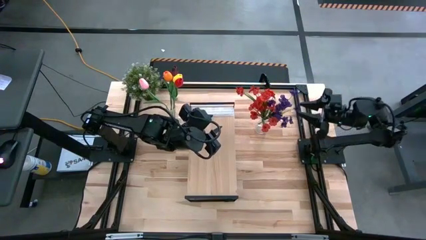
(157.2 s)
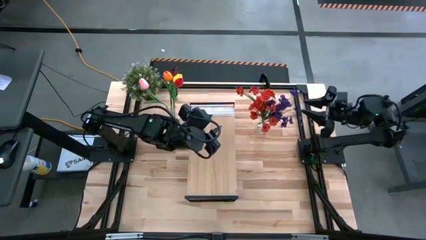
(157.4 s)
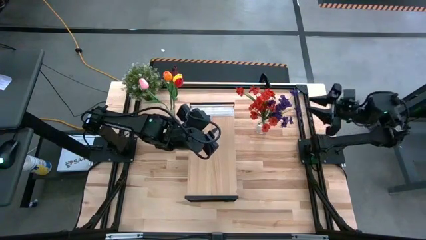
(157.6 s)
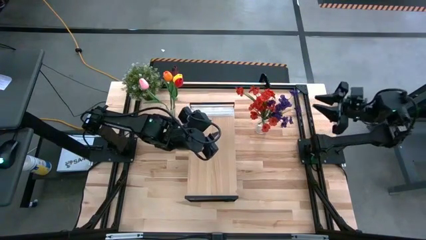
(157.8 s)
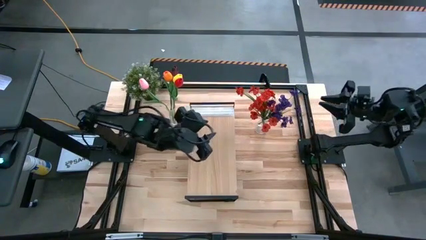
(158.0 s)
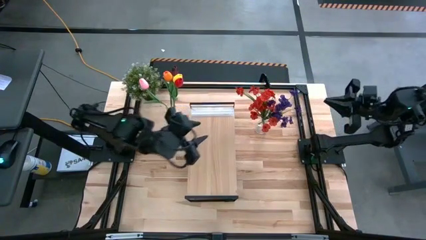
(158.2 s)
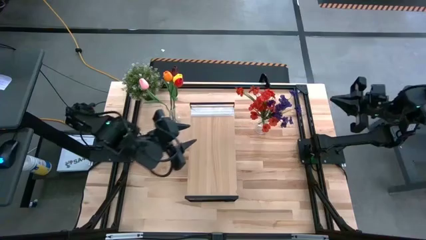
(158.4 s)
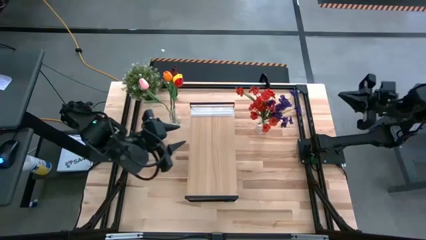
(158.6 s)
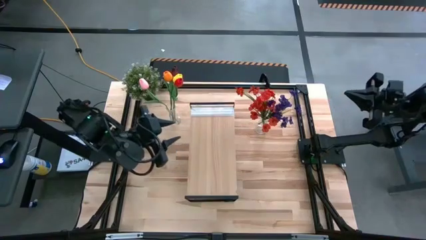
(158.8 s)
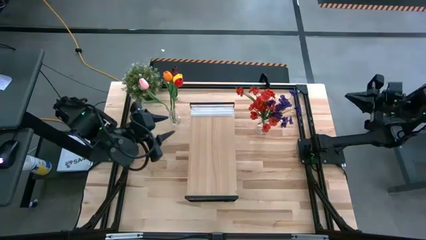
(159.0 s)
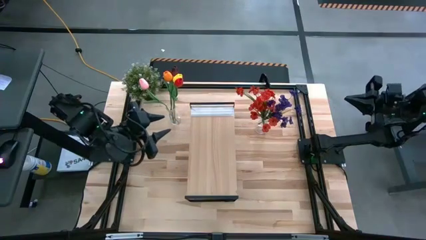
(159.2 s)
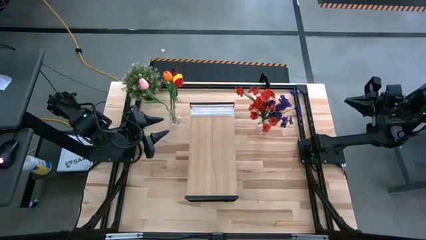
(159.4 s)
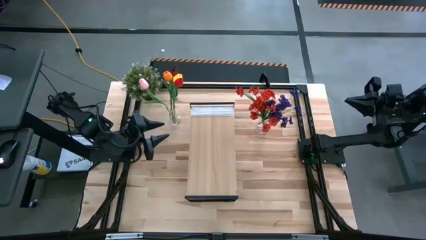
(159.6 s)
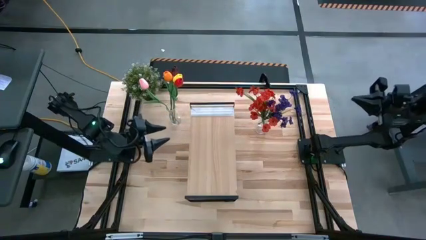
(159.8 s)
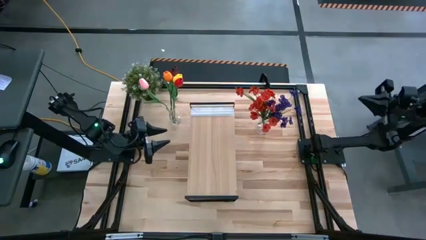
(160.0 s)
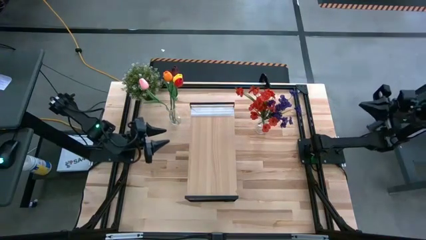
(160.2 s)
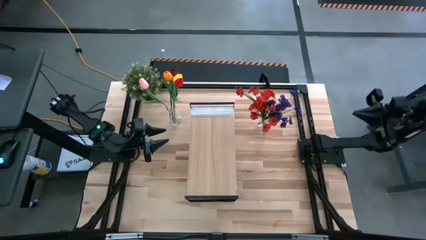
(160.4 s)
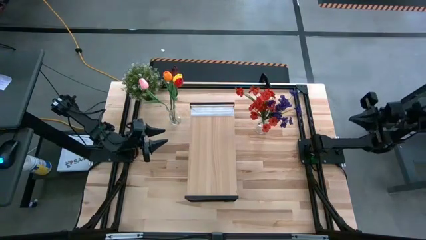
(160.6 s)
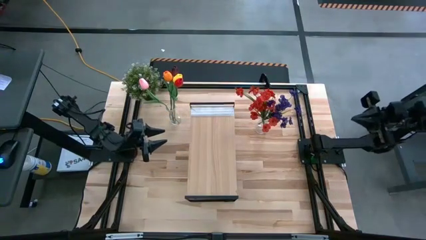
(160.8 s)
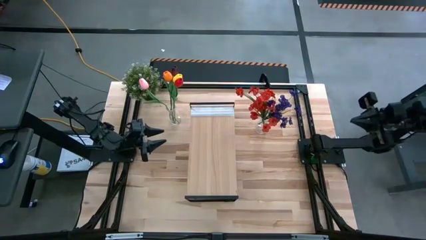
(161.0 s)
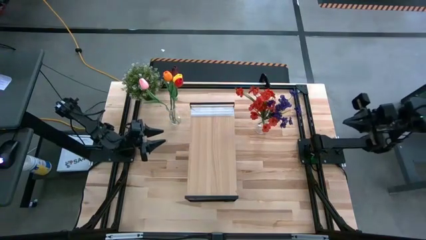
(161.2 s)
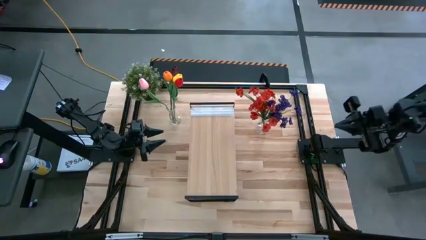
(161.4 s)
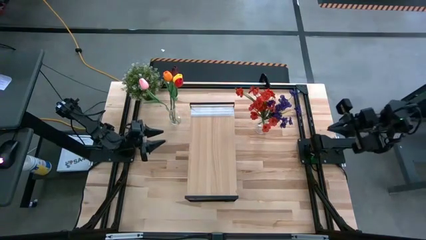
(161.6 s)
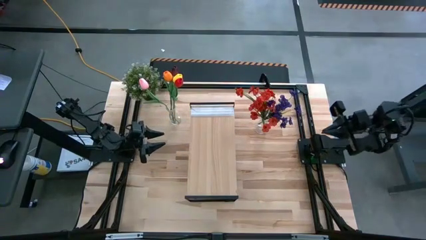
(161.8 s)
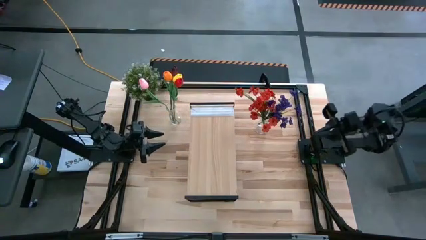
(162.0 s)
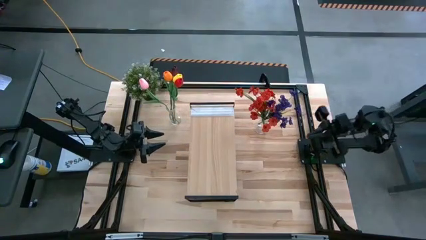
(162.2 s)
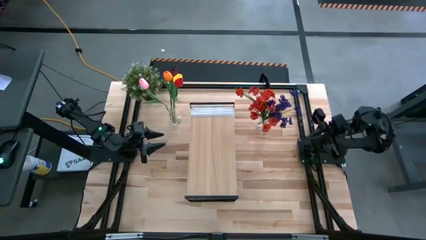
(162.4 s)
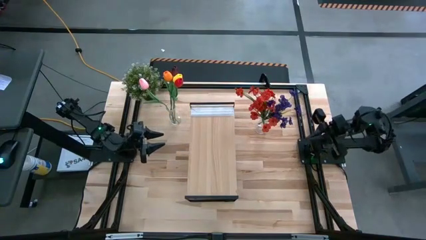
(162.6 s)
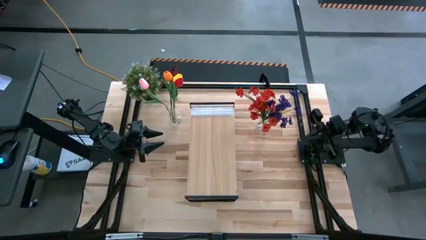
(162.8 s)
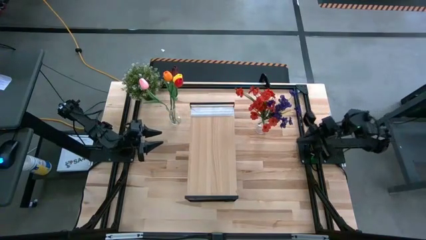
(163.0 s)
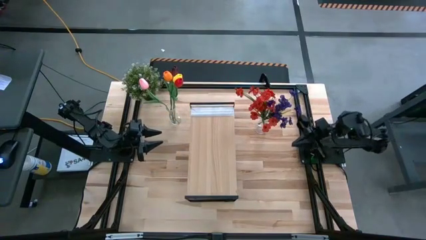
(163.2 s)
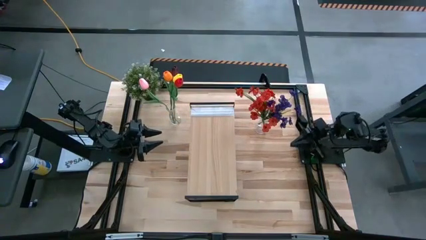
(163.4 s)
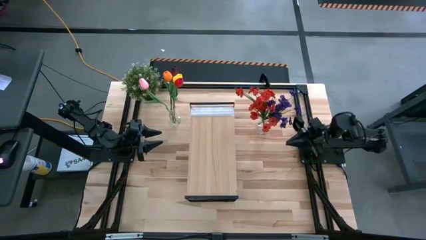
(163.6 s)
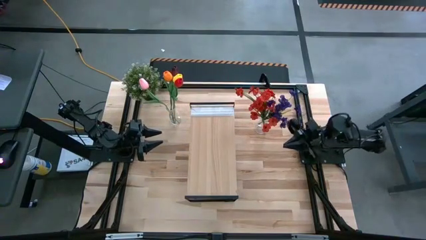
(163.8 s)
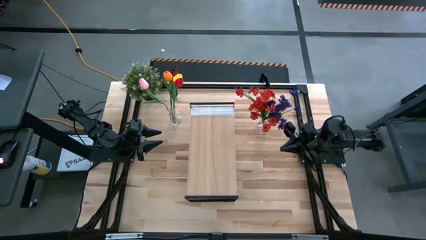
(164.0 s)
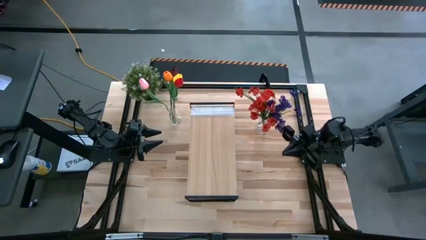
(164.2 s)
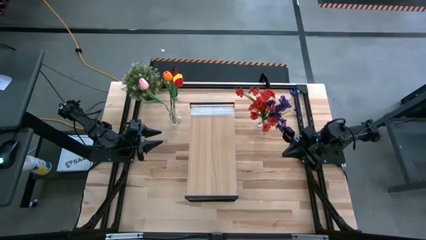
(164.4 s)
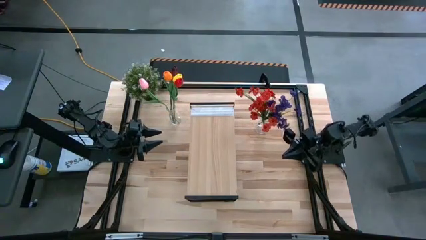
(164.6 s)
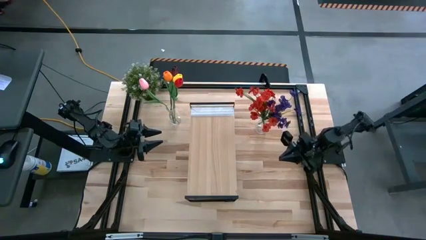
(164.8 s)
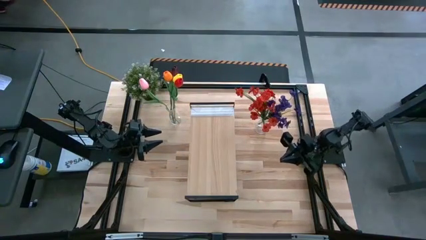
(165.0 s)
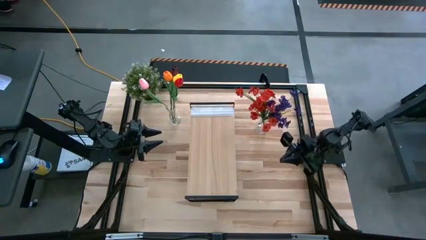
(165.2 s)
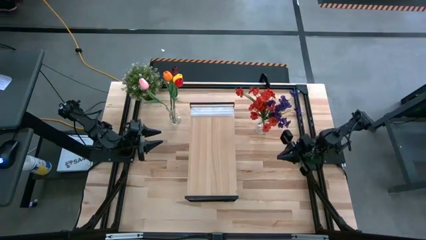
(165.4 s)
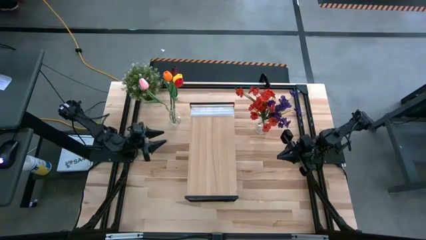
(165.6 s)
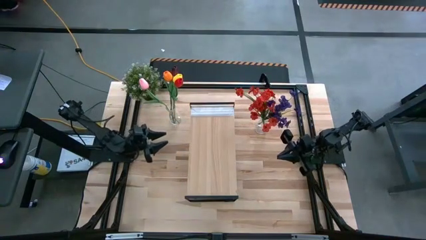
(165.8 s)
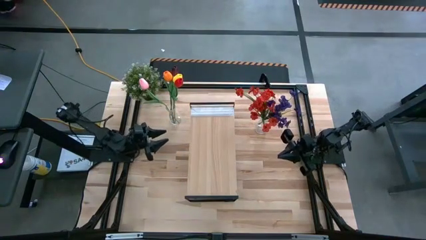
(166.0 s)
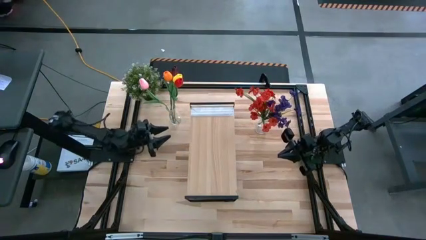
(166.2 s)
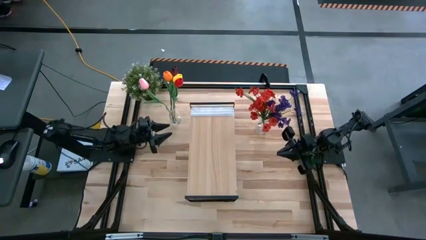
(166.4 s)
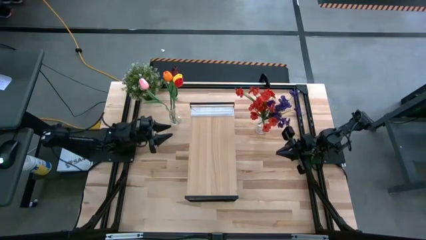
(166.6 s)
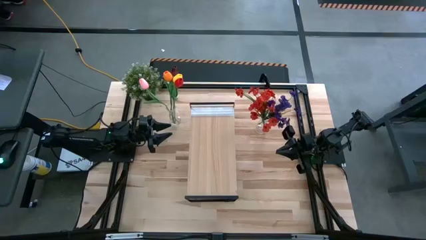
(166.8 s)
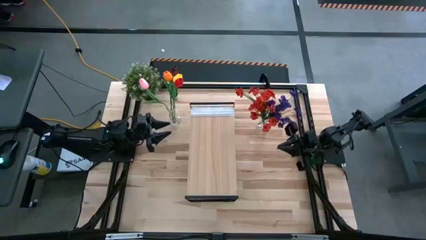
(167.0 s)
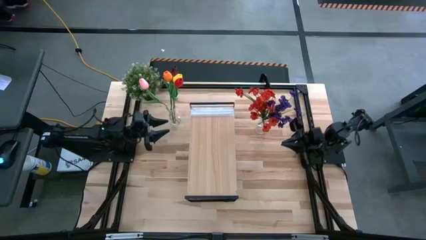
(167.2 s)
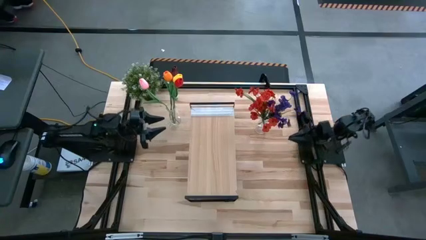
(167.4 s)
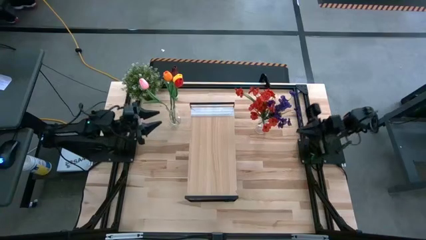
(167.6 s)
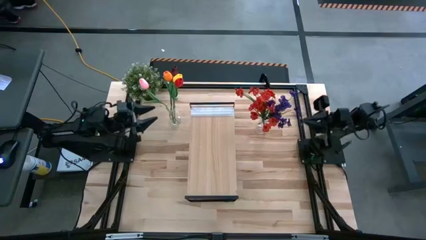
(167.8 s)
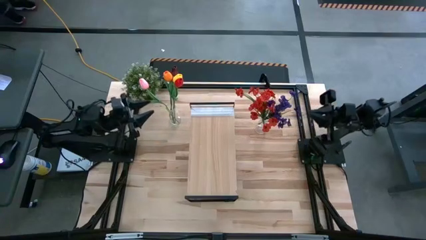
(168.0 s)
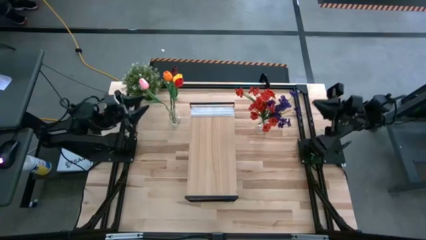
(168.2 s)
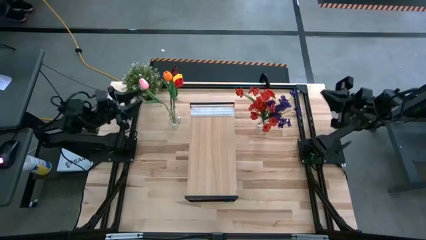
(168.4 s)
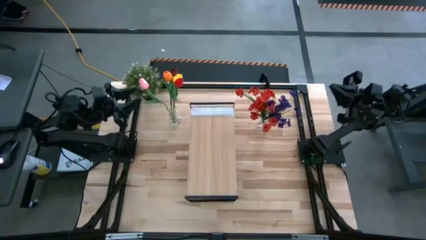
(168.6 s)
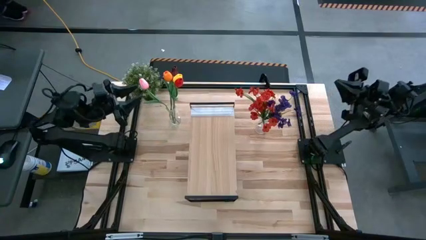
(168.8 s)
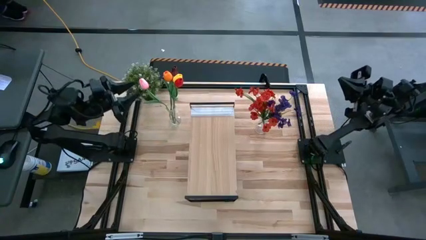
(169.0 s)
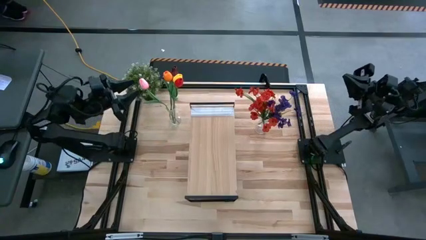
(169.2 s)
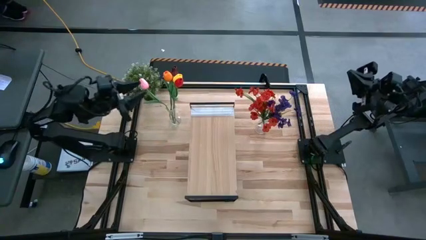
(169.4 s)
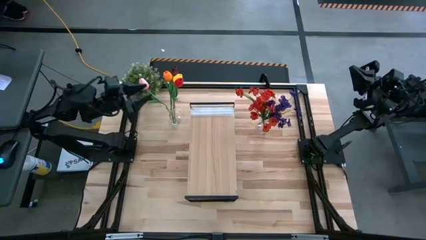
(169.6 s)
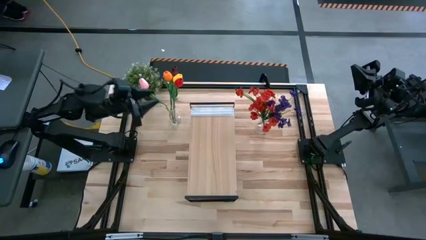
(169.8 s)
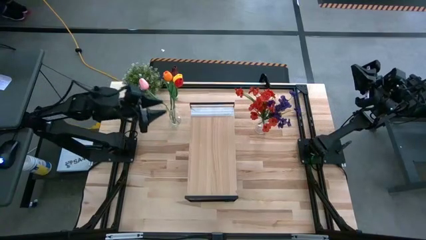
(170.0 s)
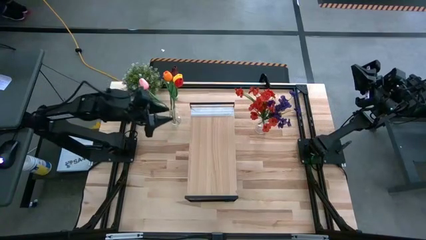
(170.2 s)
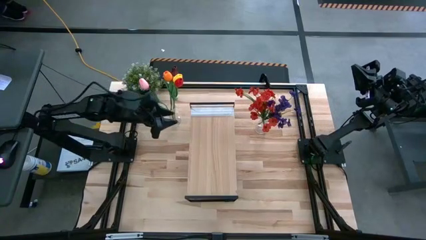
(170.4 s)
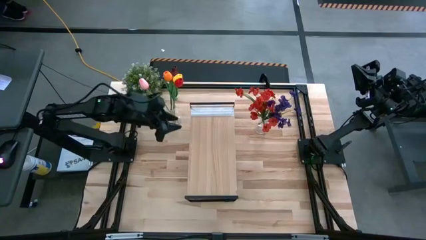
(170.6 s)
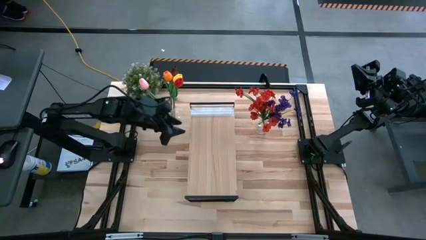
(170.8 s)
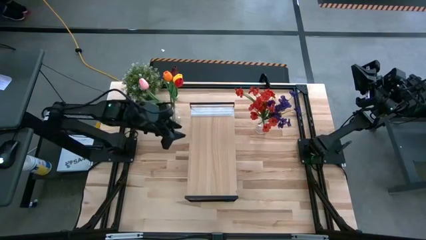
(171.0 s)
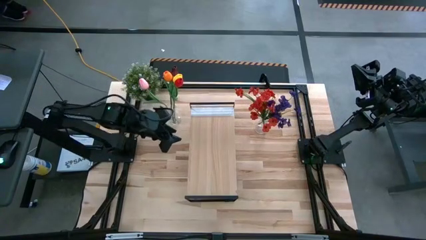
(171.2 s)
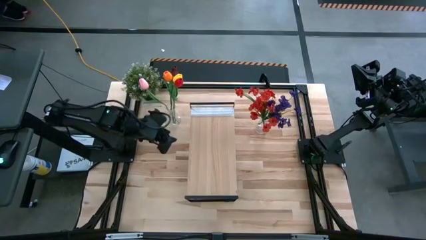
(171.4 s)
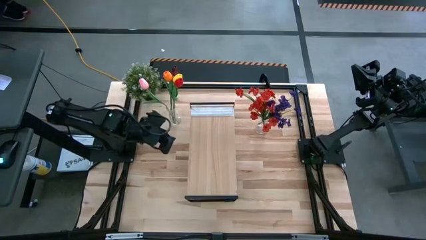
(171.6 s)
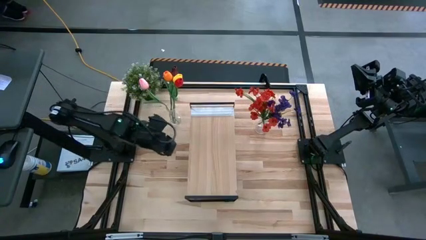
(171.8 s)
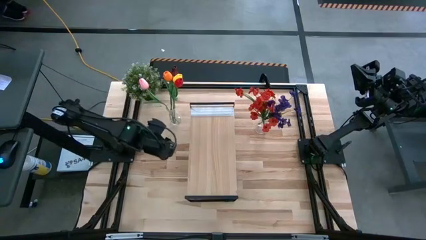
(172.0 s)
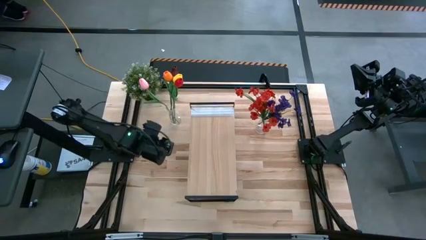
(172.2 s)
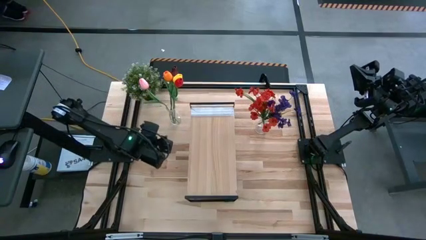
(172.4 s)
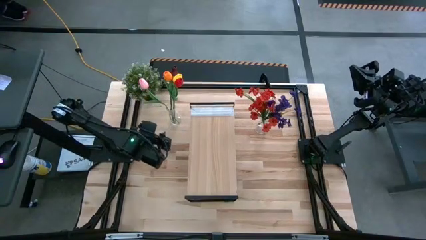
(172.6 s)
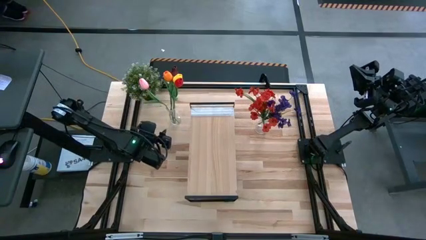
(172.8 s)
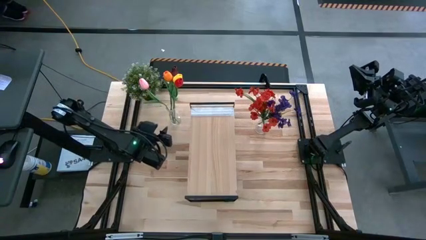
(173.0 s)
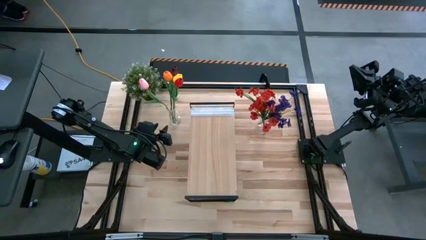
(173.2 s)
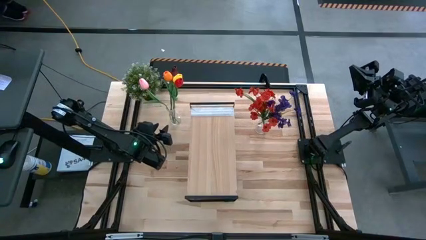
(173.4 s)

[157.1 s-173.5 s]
Task: Pick and place flowers into a vace then onto a shelf
Put the left transparent vase with tulips on the shelf
